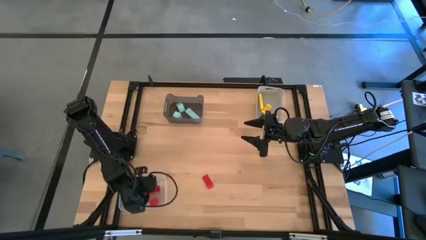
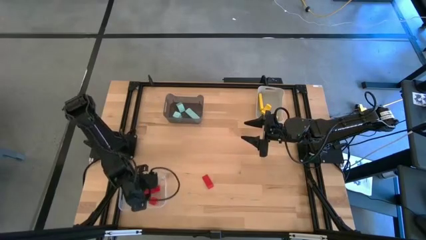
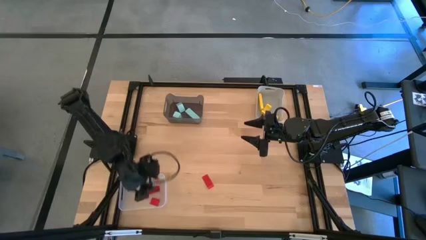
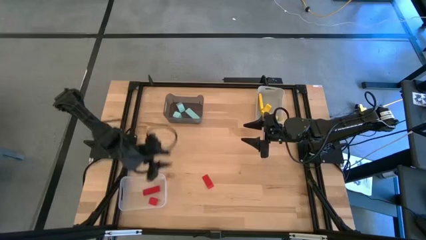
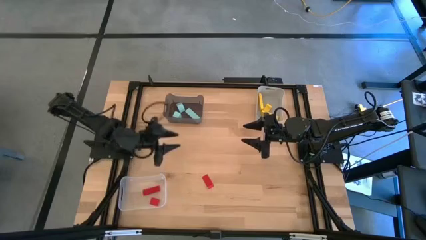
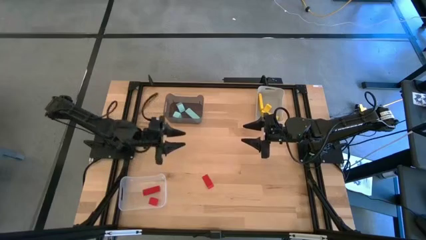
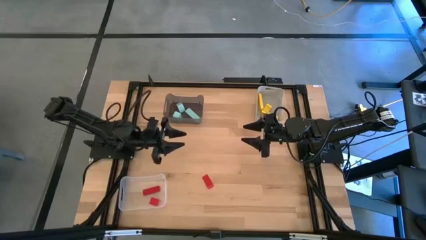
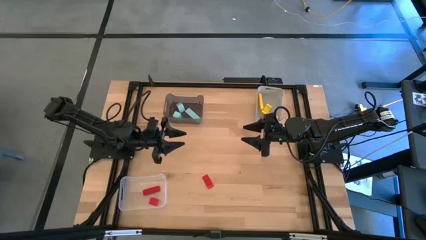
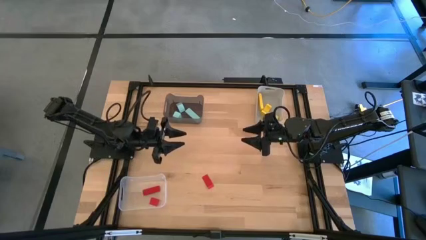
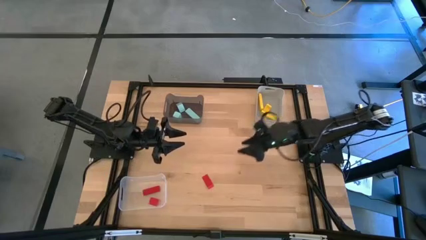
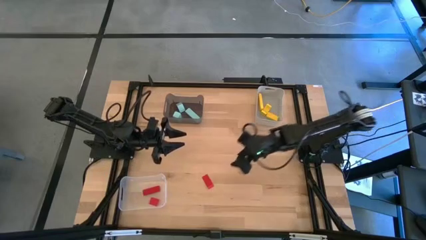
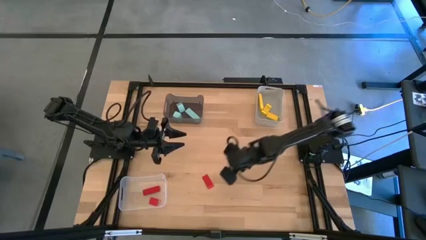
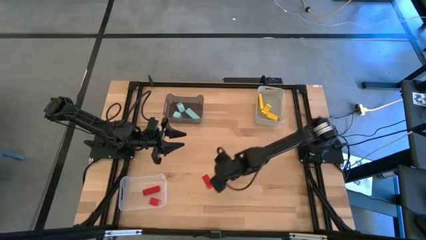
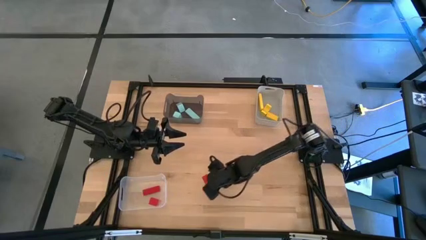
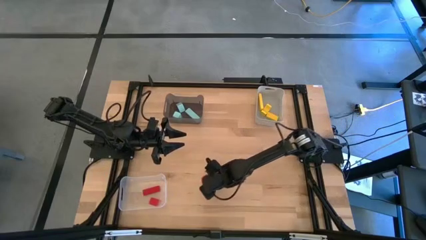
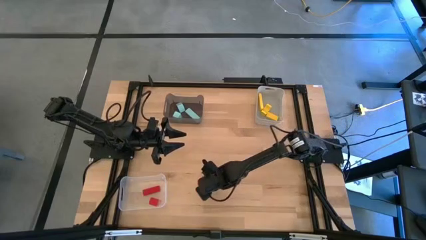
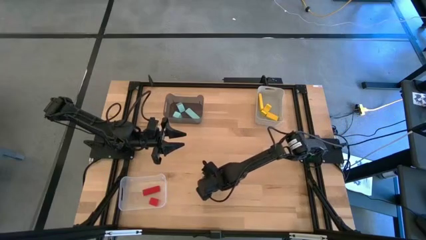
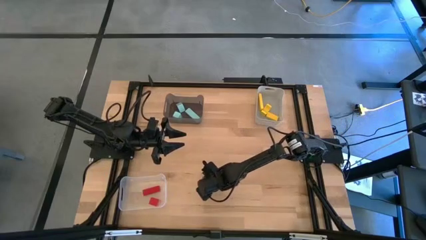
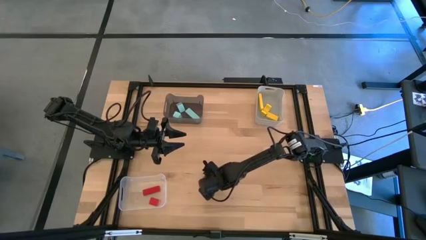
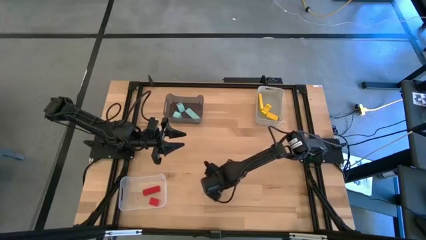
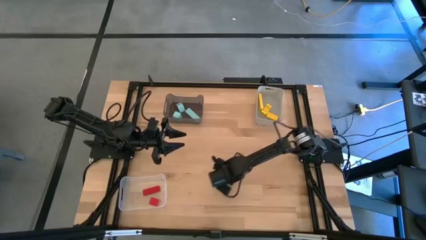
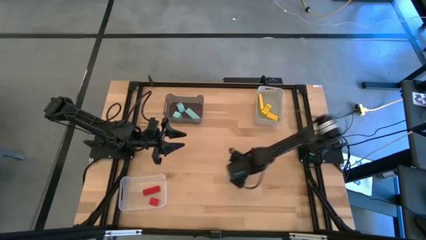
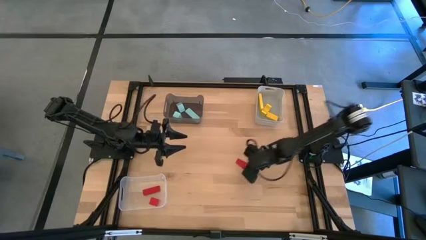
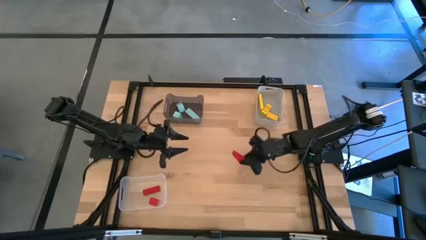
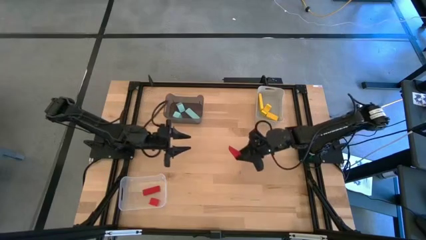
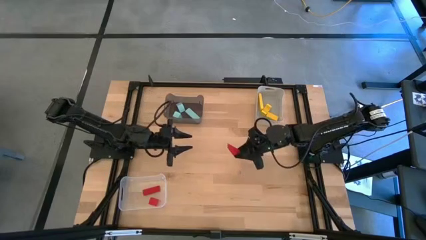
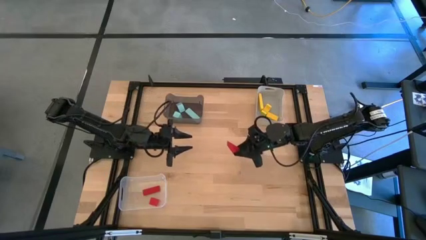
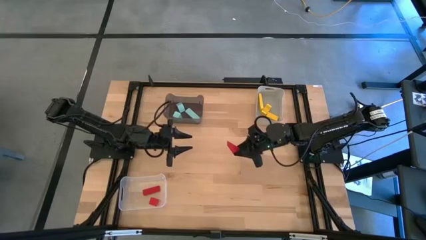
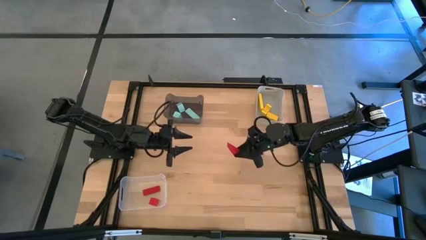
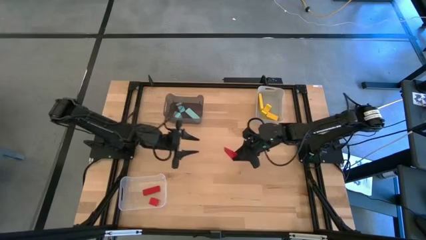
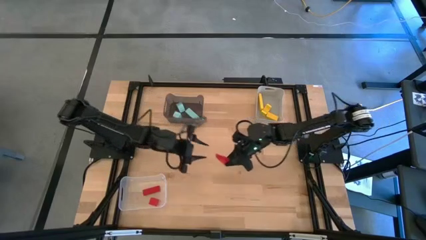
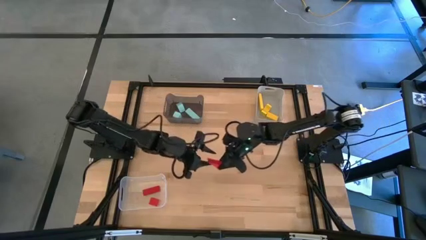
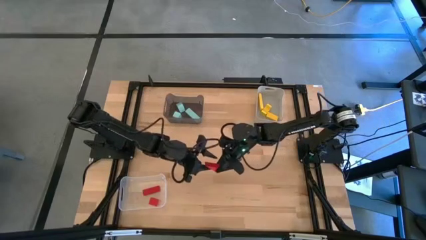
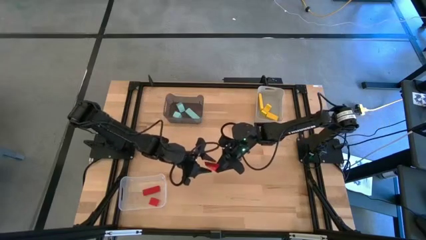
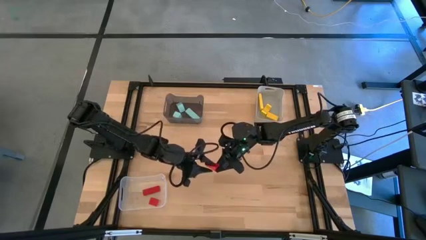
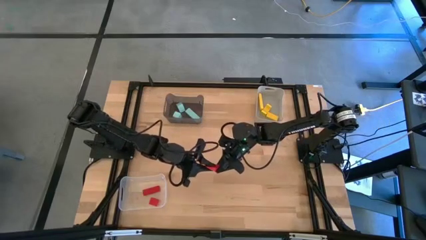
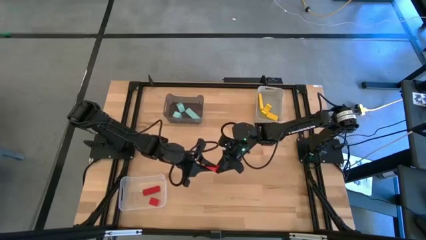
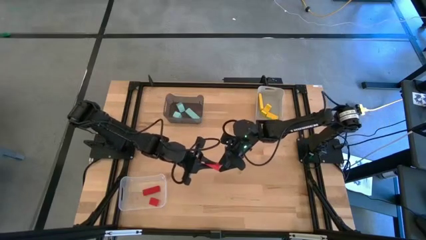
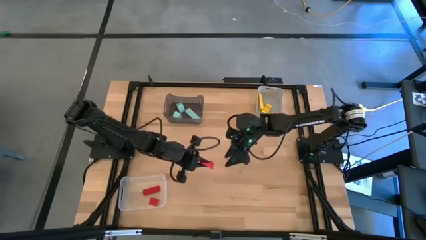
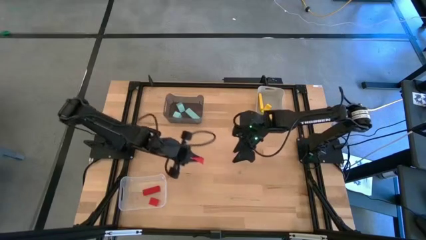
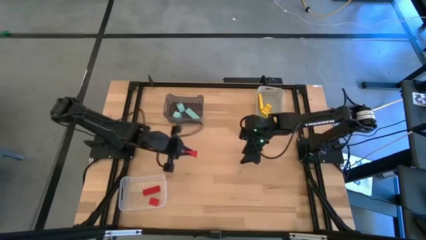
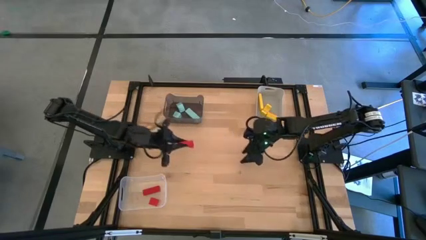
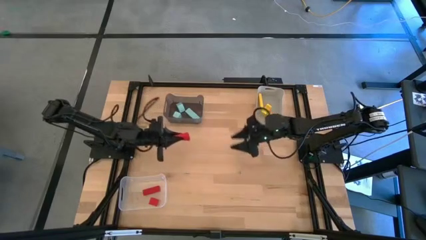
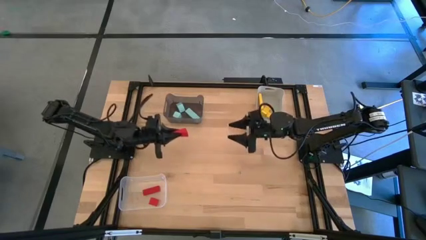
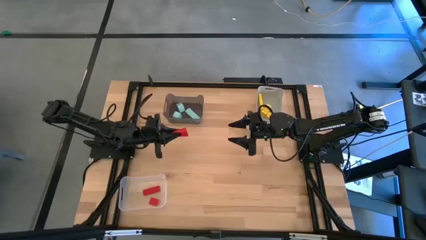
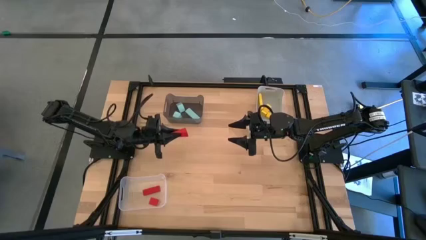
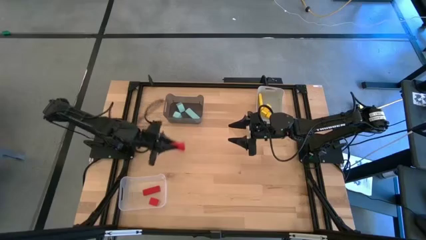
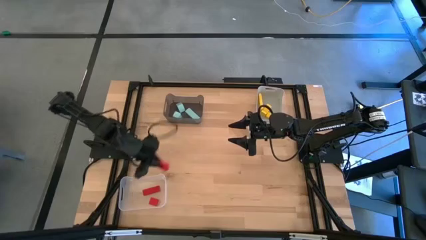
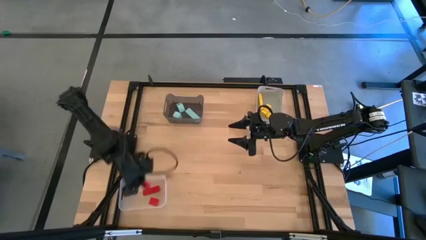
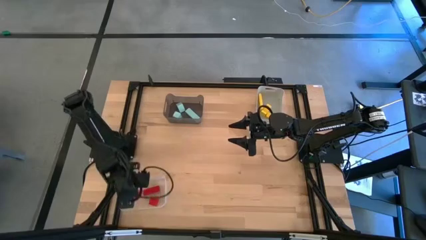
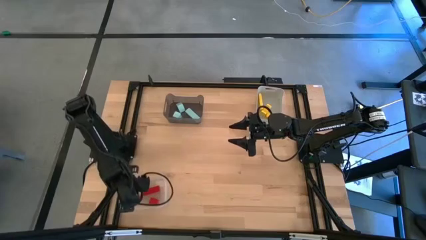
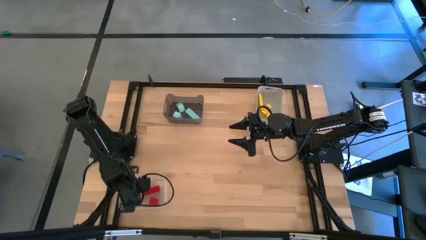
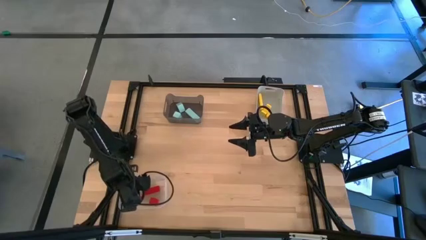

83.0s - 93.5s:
Task: Sort & place blocks by color
Put the red block into the white transparent bin

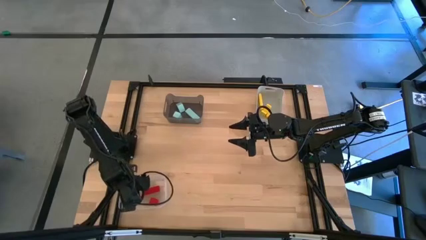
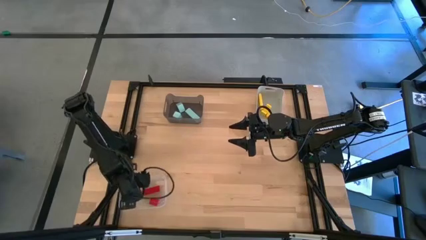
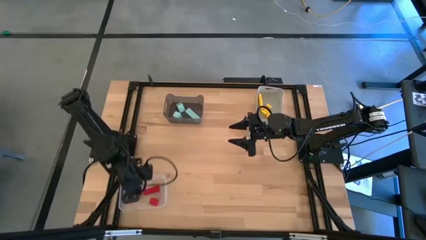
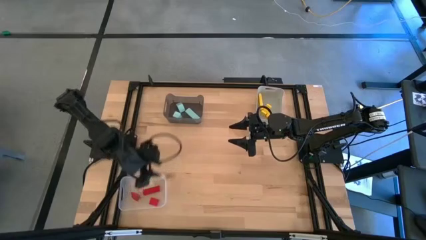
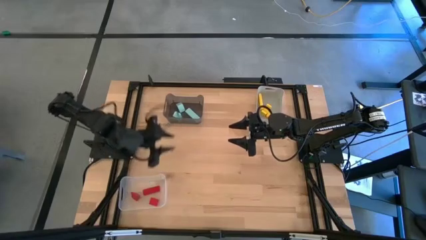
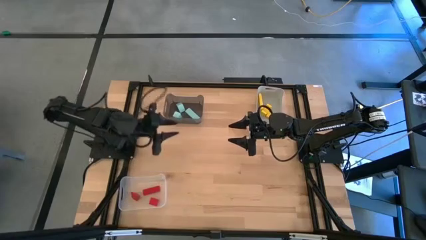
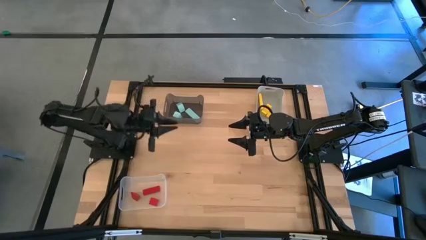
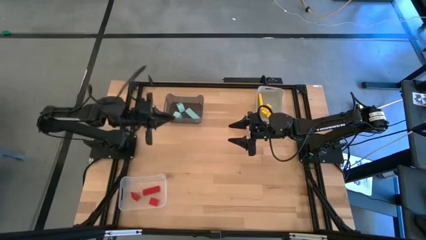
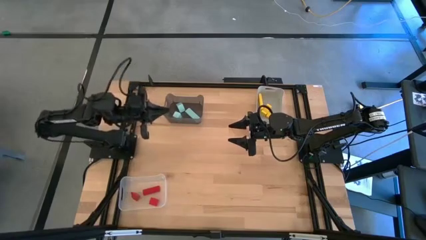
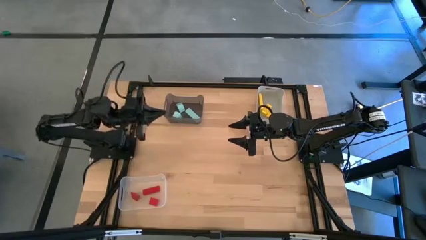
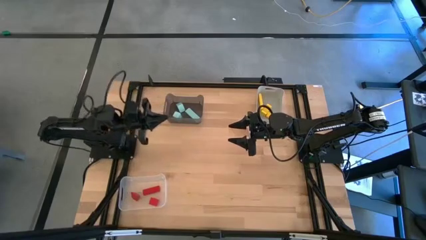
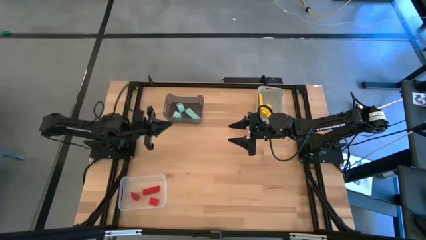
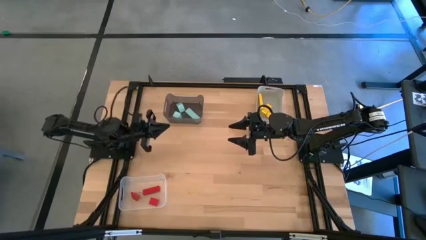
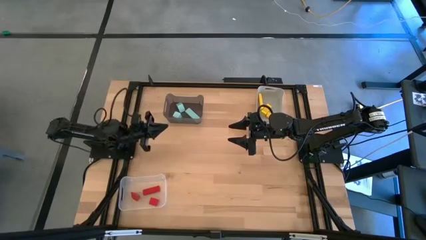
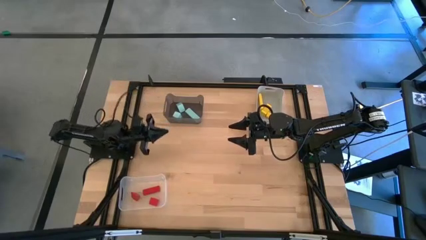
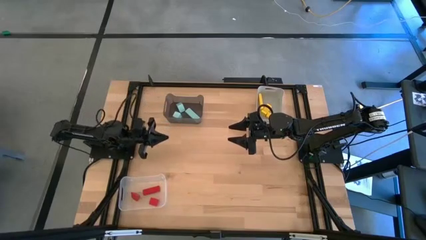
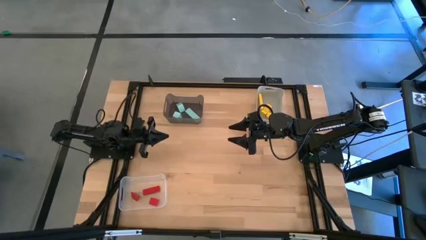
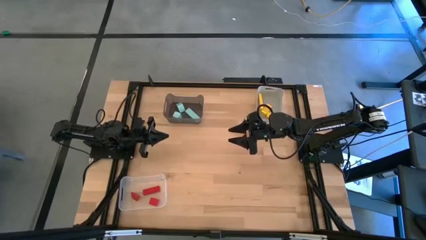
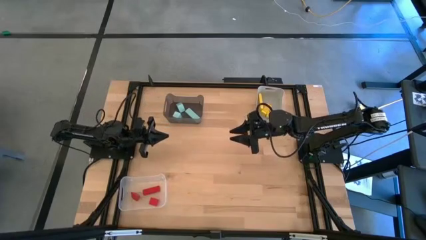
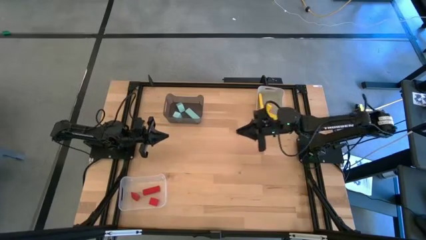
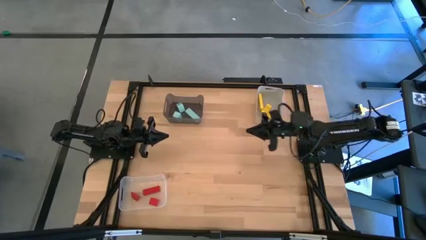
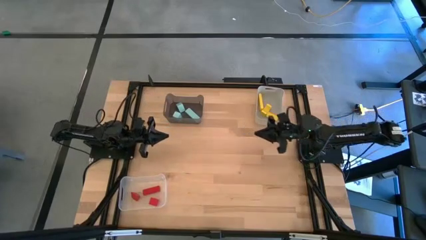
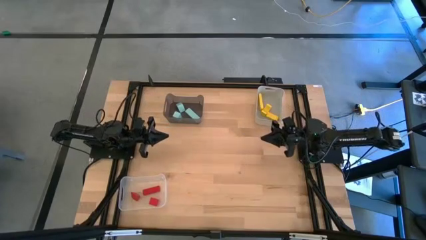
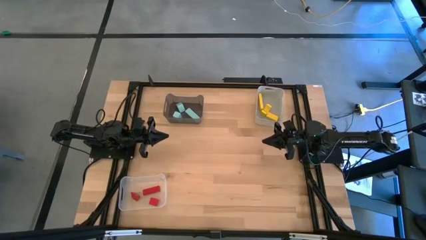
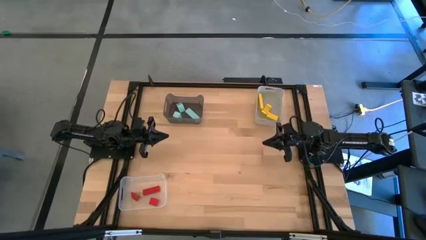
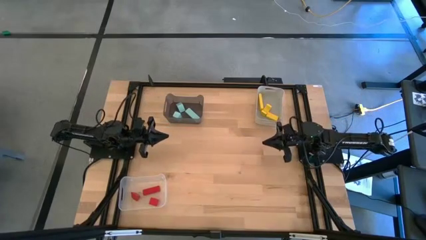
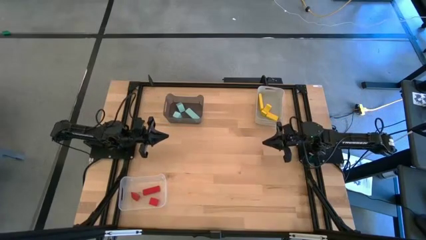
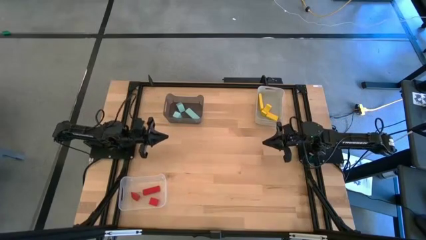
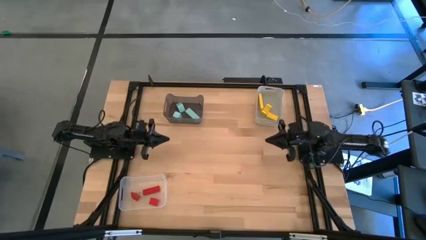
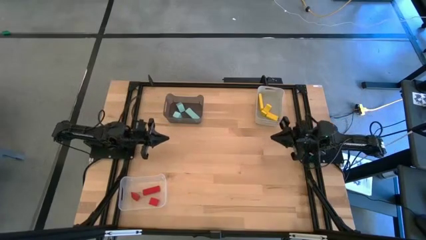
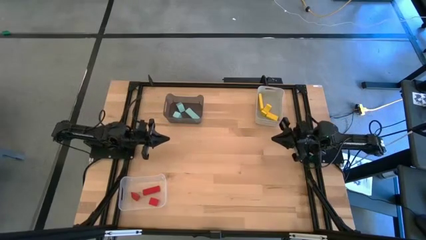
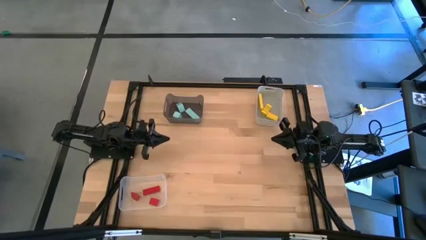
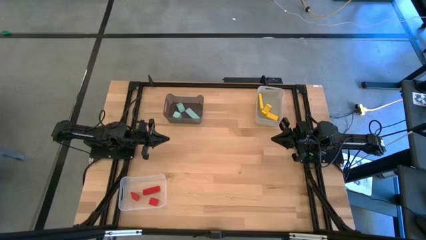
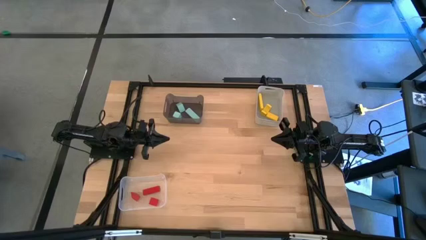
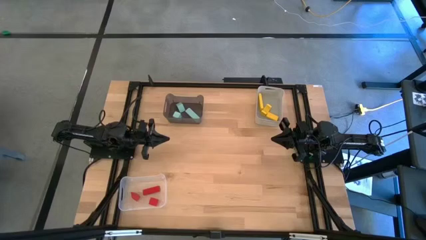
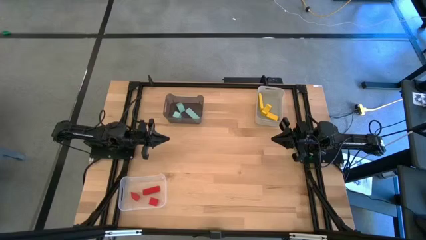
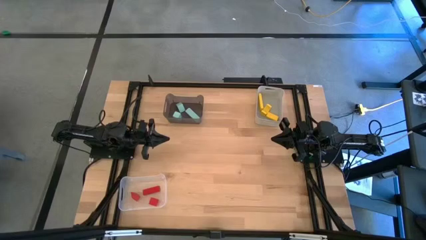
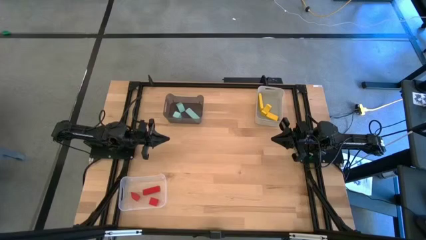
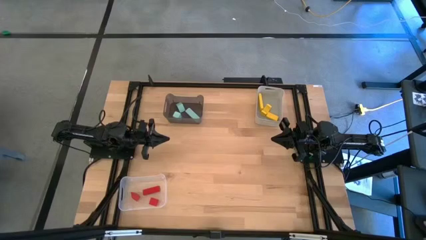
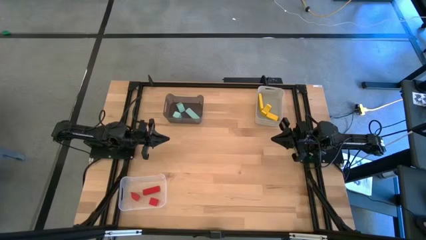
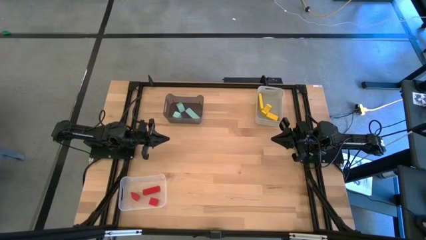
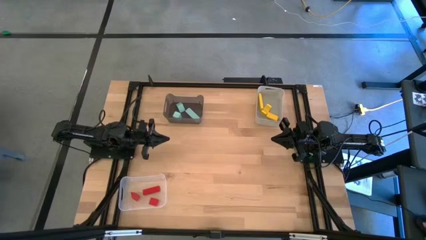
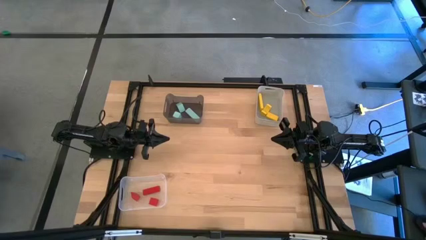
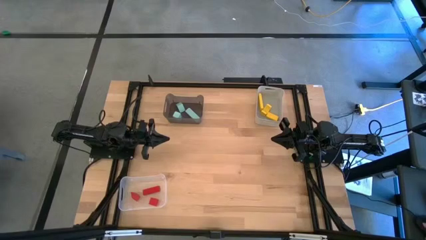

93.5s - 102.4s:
Return to Home Position
